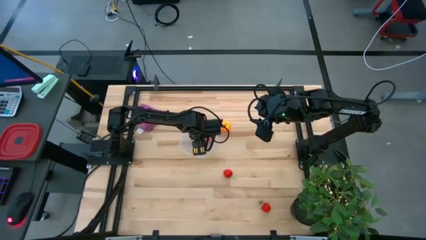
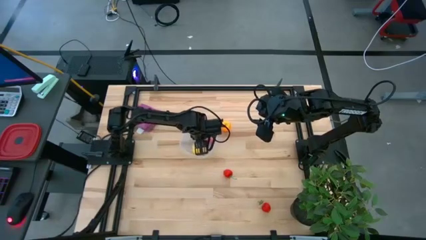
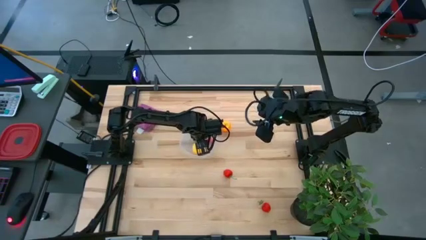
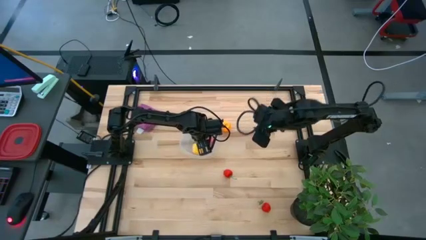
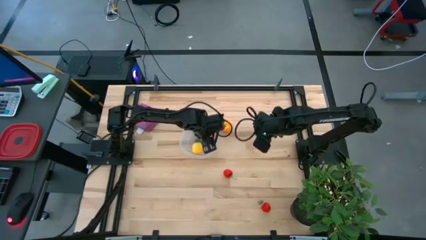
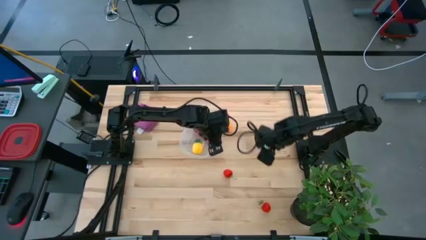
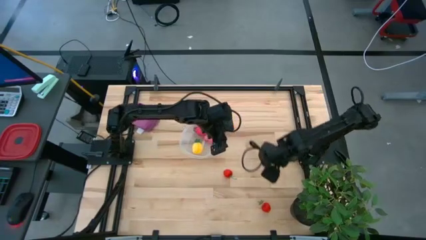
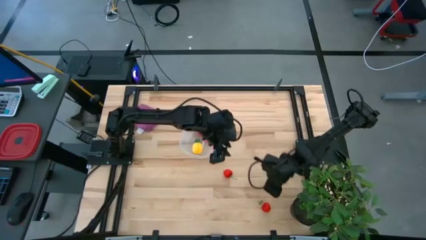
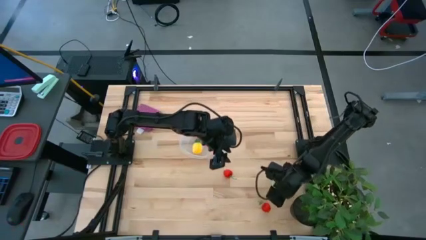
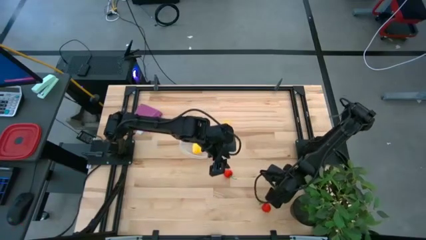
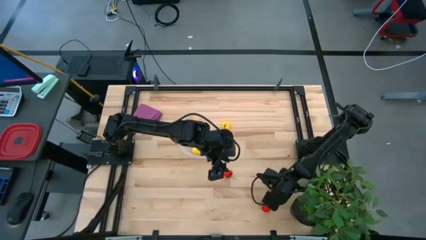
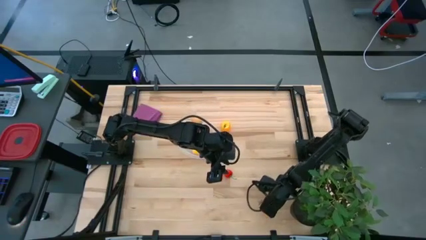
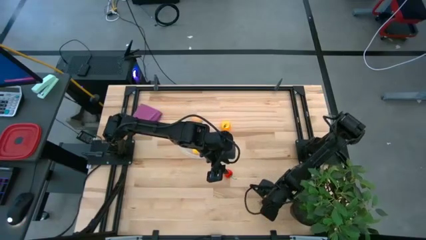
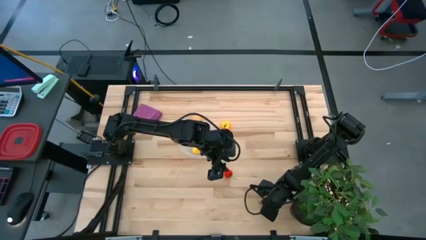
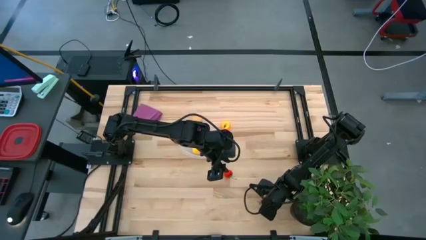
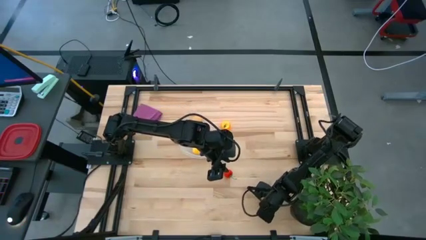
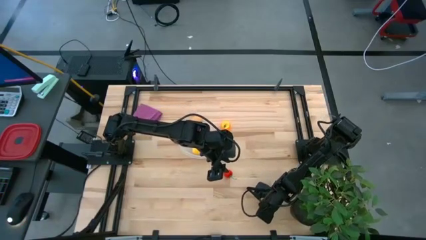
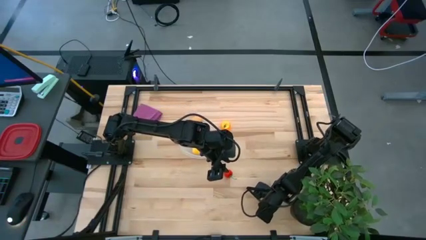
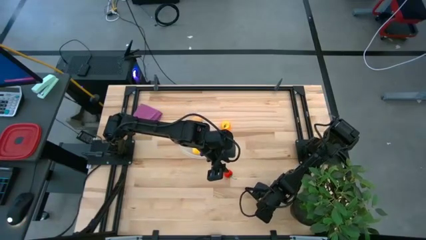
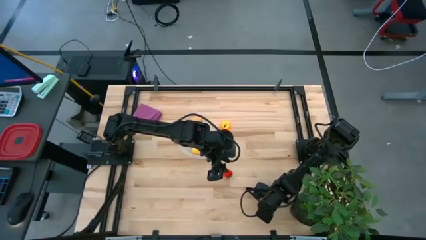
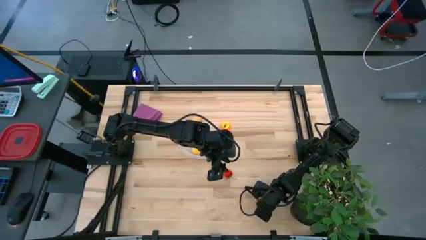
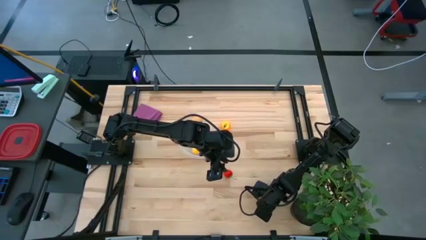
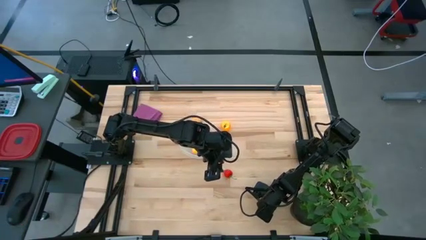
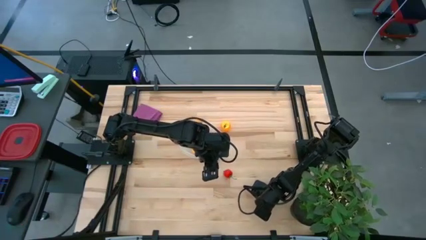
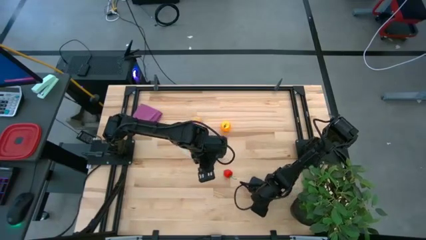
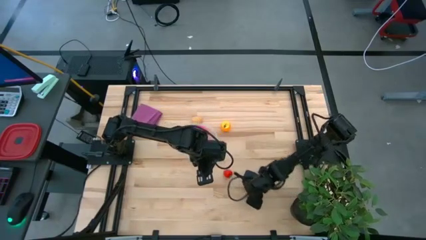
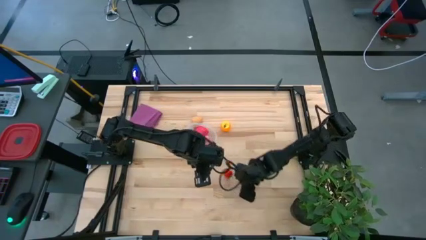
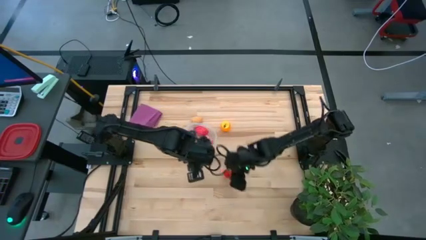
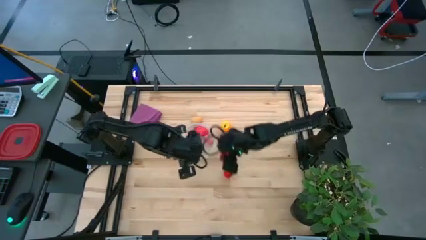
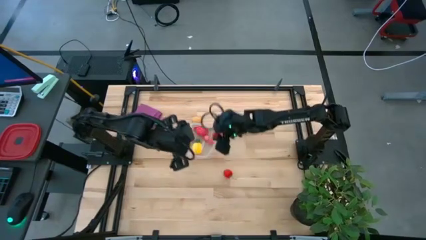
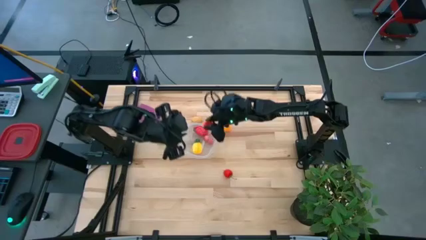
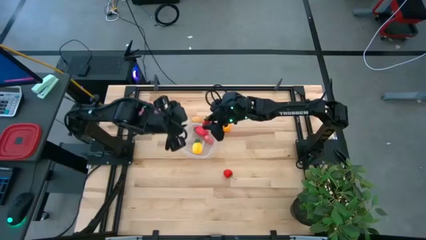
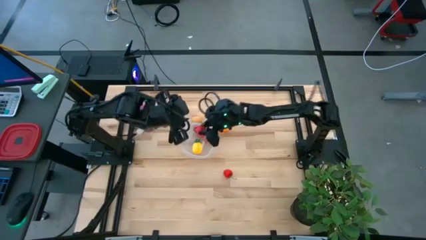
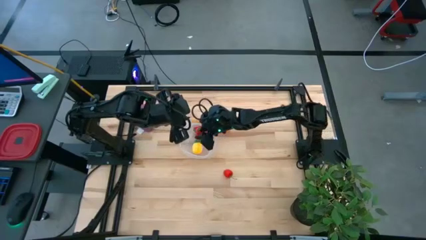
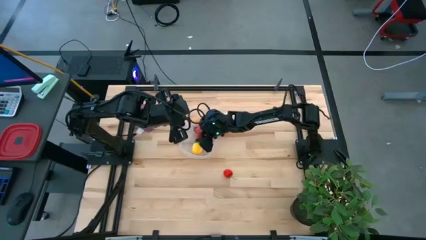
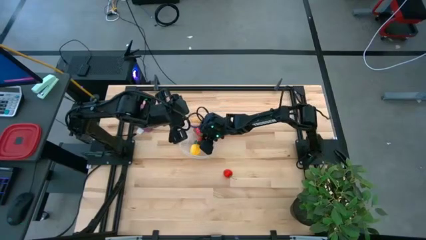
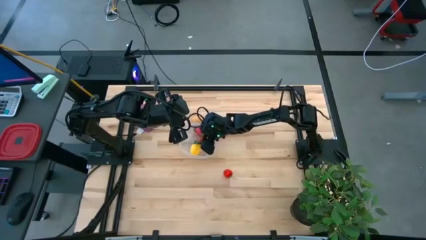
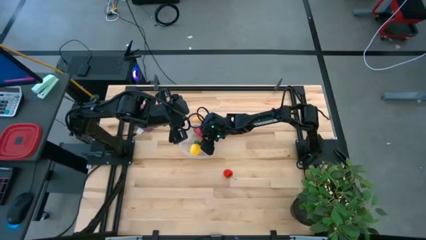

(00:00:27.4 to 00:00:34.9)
Task: Pick and placing Produce into tupperware
Put the bottom red strawberry into the transparent bin

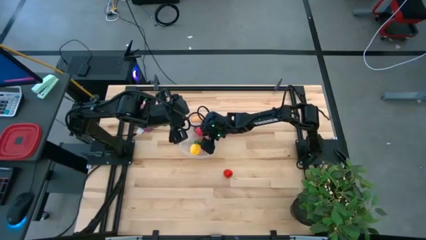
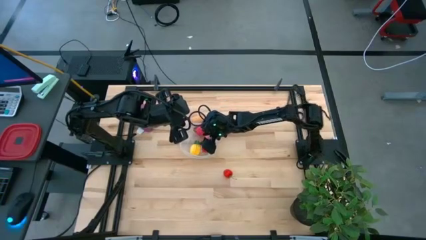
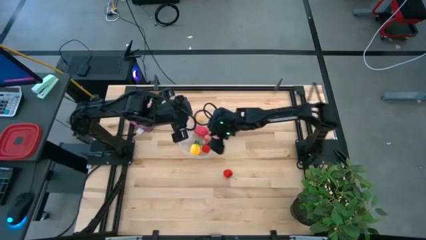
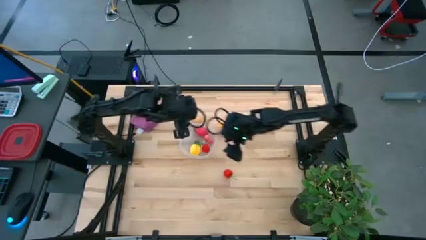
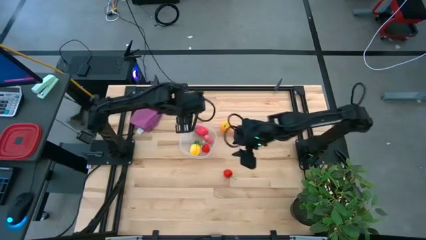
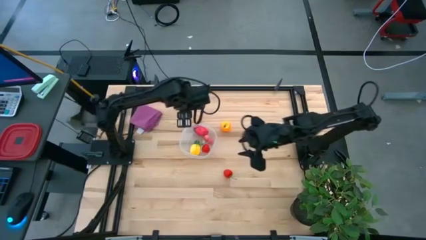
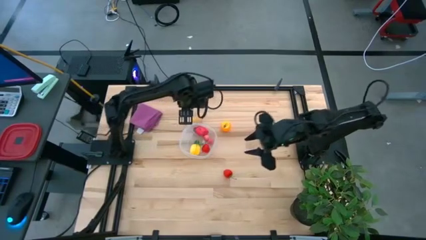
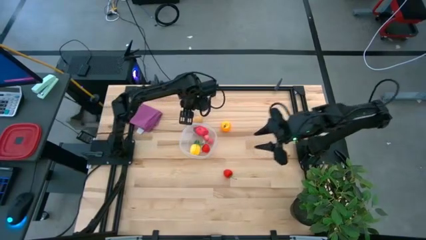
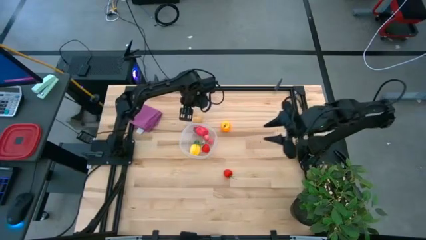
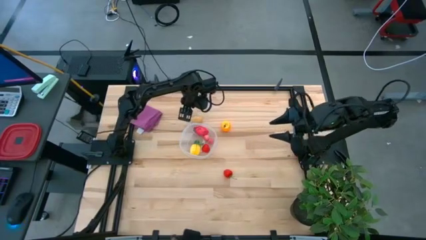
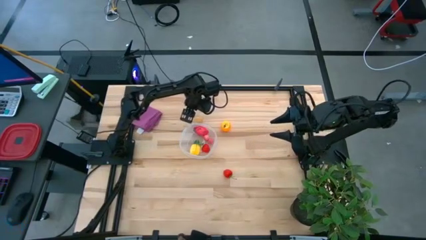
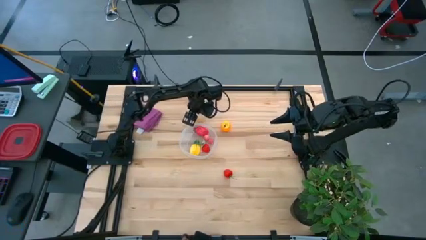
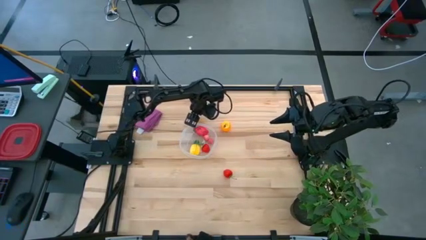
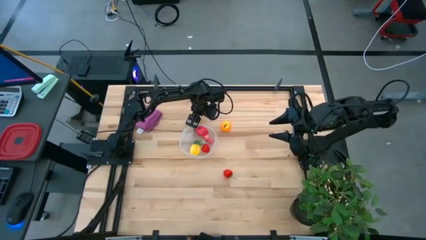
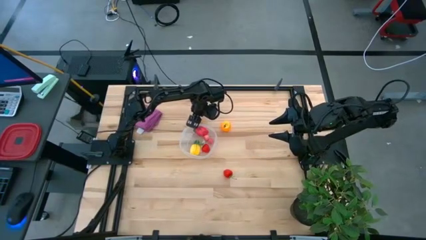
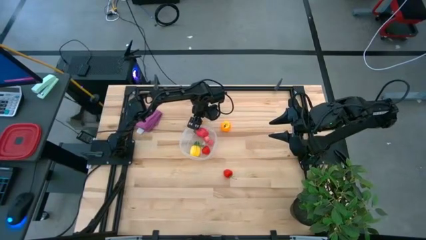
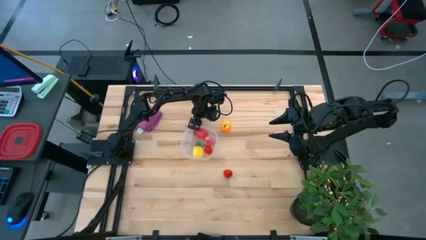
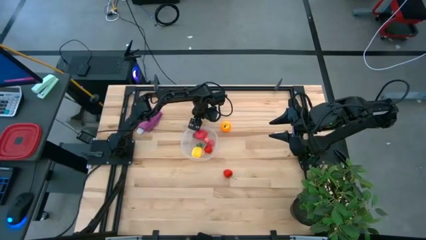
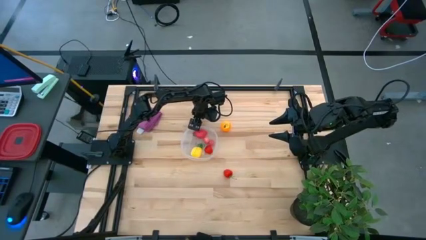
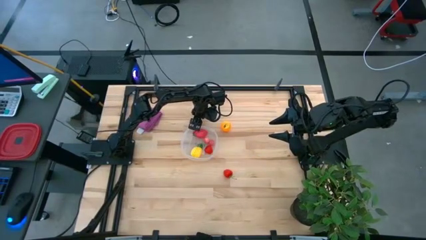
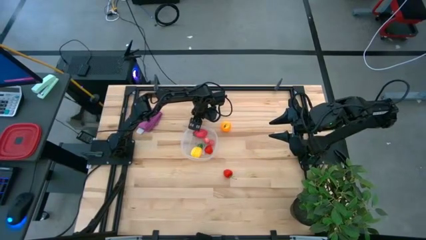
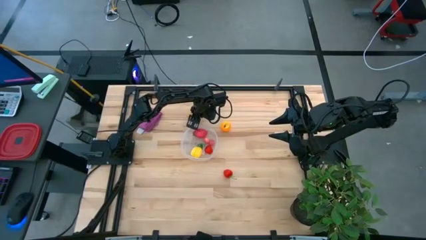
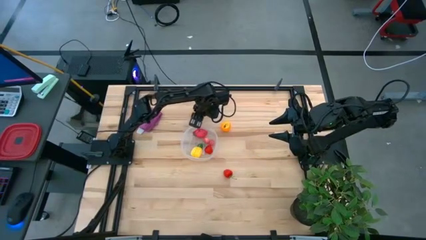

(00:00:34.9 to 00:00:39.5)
Put the brown potato into the transparent bin

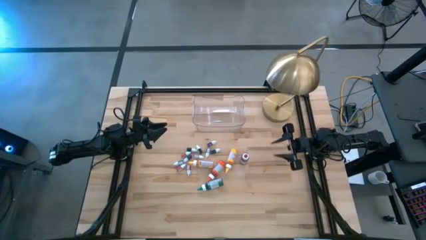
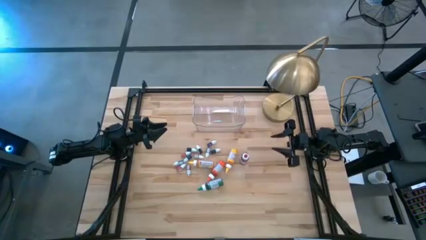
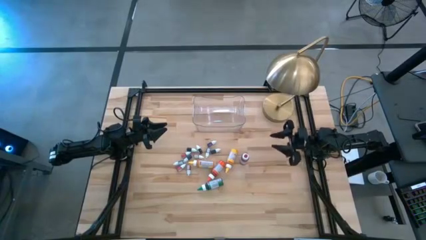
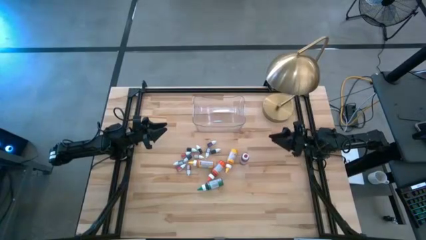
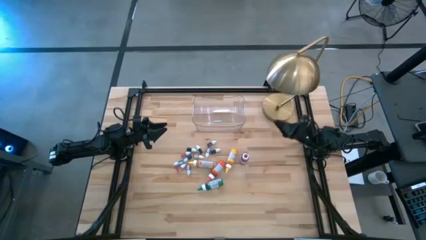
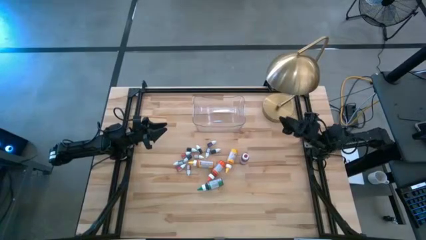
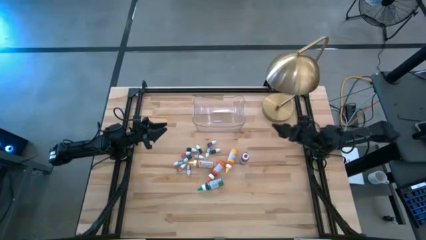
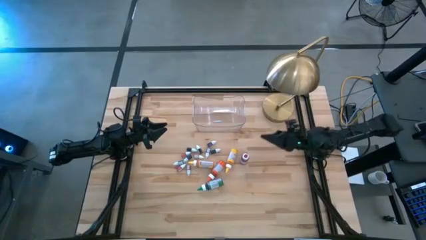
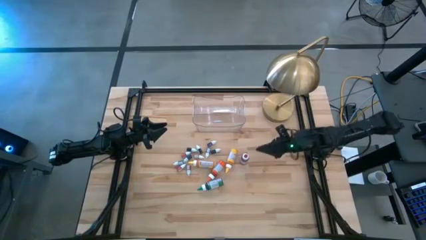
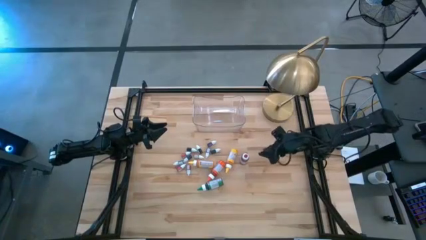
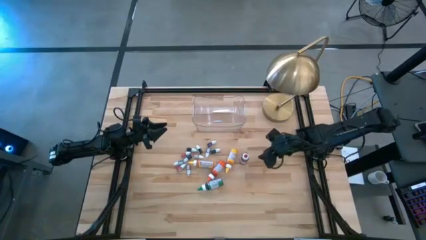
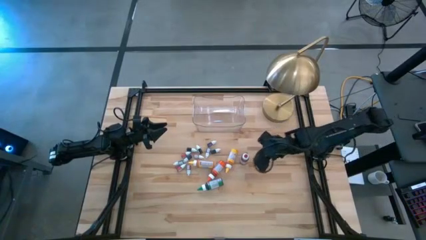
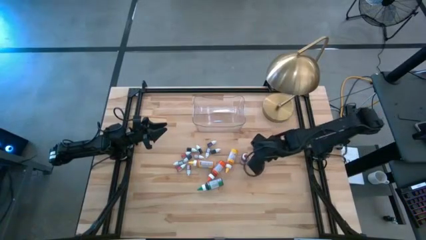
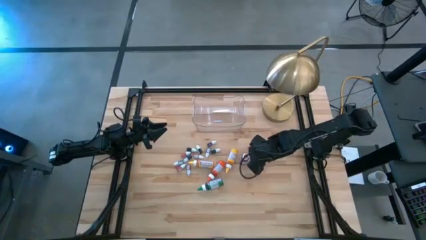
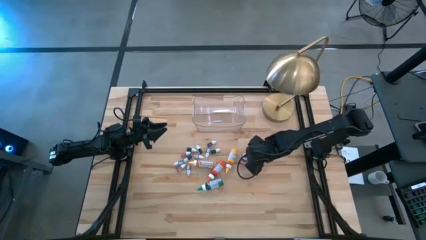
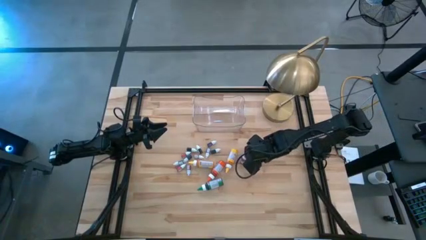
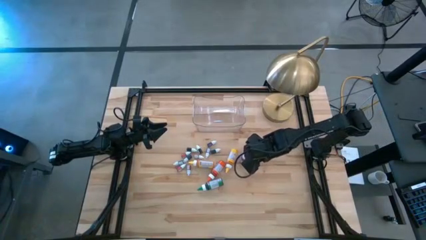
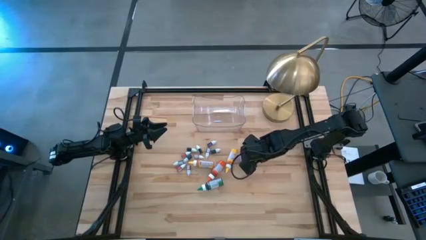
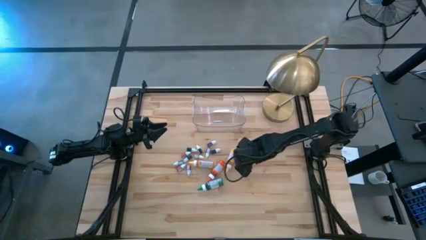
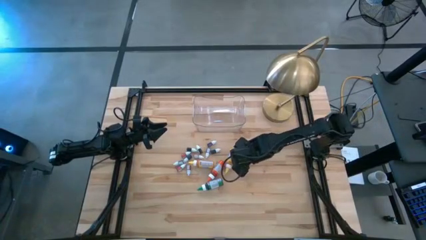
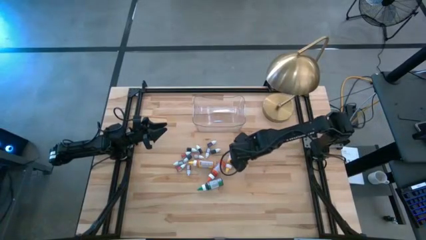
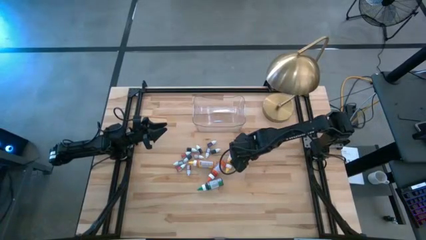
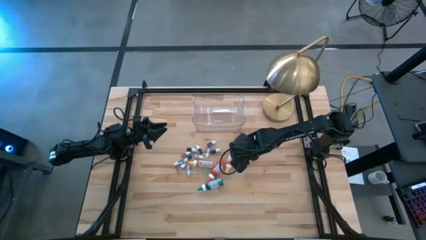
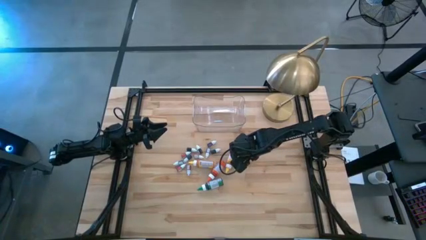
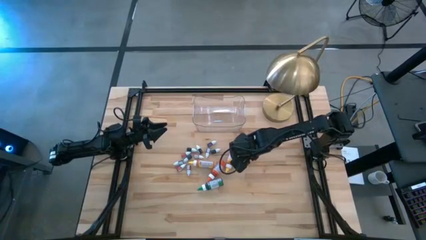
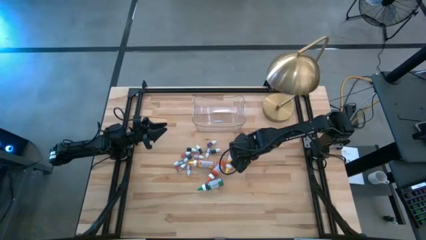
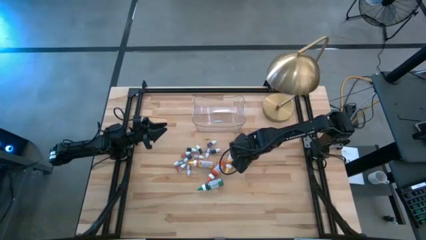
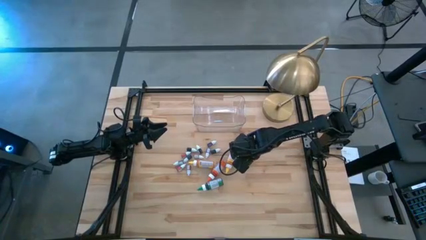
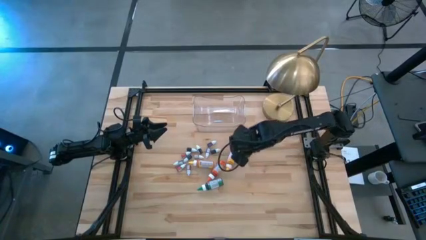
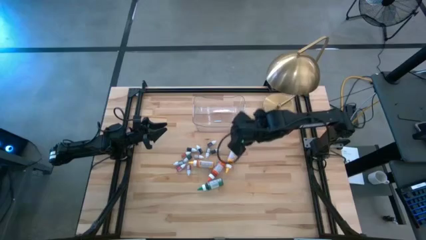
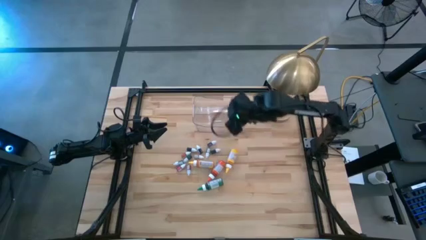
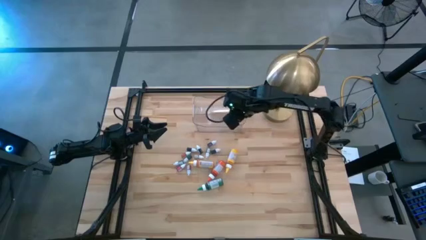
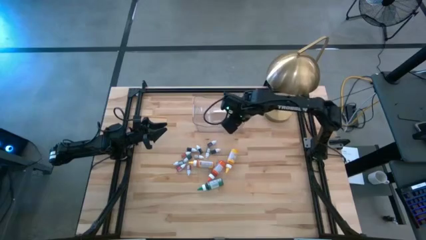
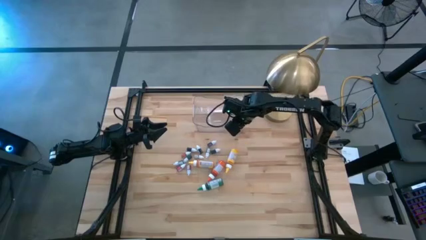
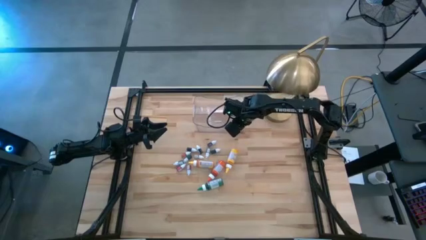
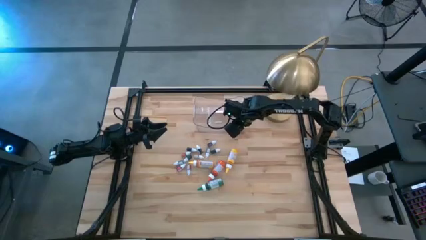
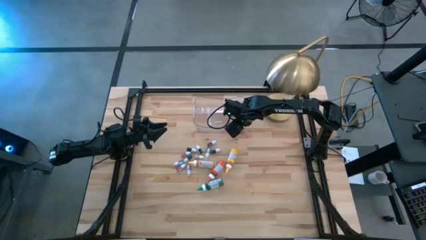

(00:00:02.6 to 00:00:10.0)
Task: Pick & Place food coloring
Put the big dark red food coloring bottle into the transparent bin
